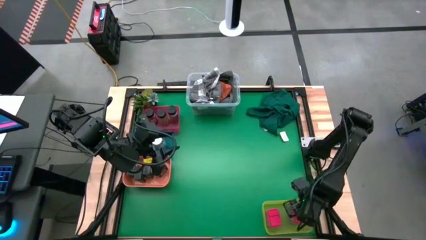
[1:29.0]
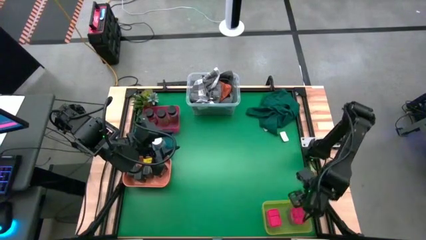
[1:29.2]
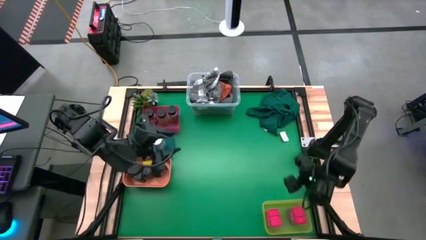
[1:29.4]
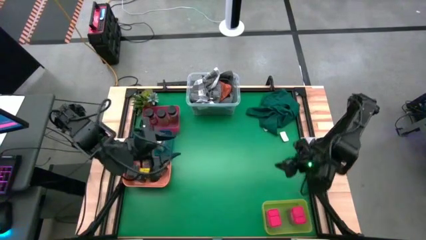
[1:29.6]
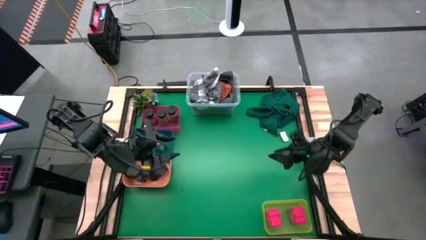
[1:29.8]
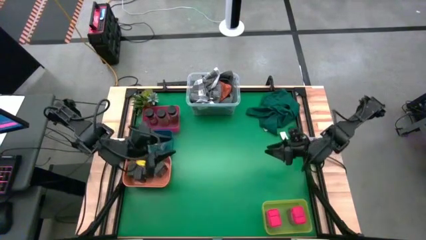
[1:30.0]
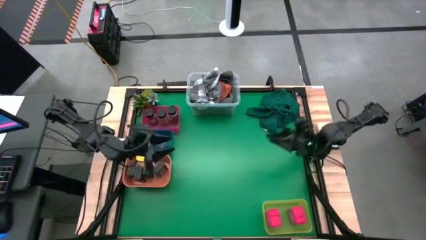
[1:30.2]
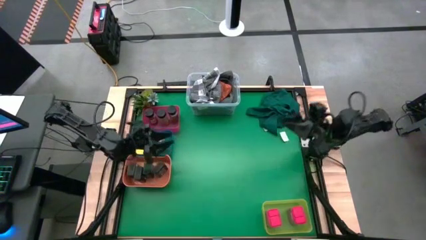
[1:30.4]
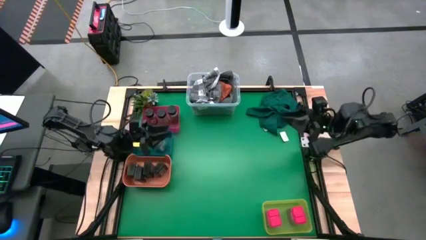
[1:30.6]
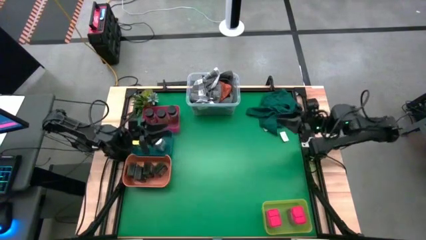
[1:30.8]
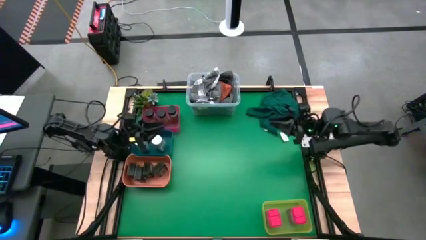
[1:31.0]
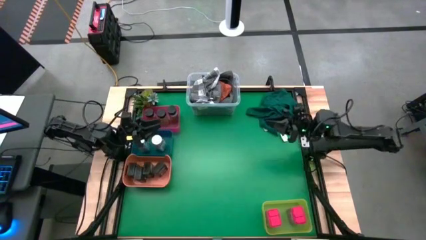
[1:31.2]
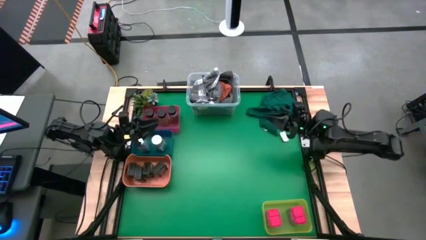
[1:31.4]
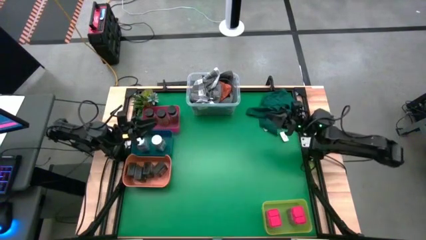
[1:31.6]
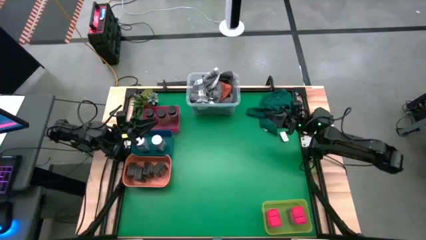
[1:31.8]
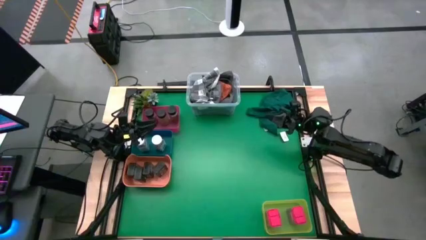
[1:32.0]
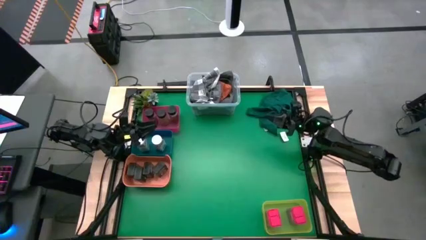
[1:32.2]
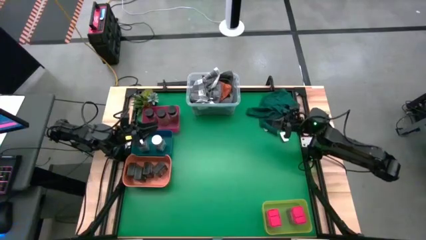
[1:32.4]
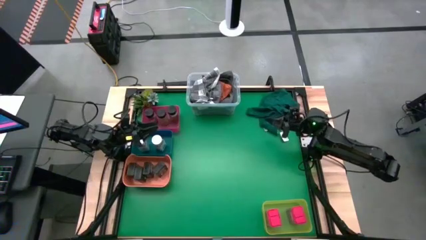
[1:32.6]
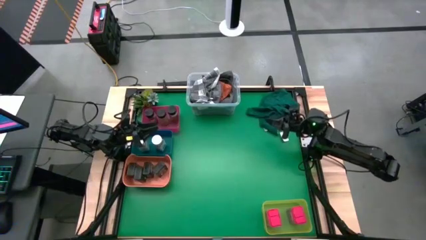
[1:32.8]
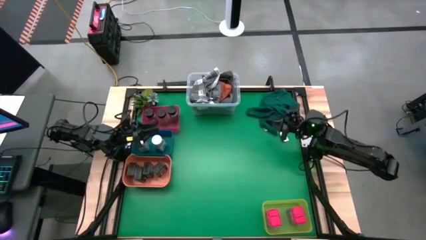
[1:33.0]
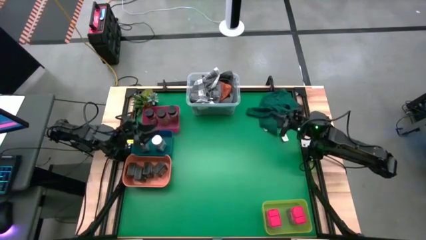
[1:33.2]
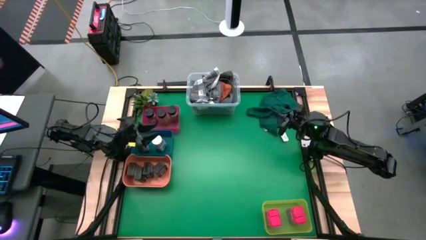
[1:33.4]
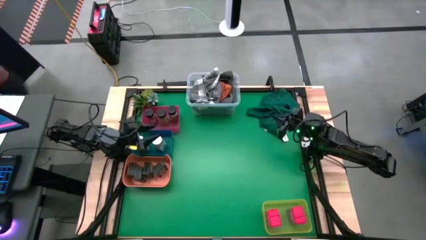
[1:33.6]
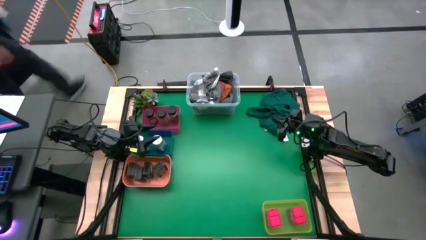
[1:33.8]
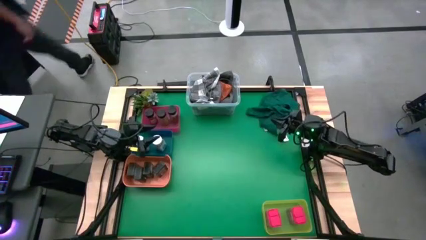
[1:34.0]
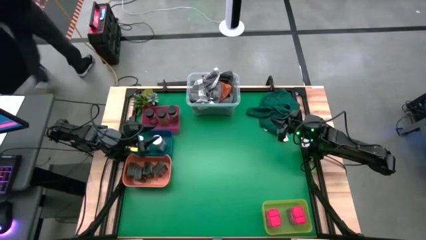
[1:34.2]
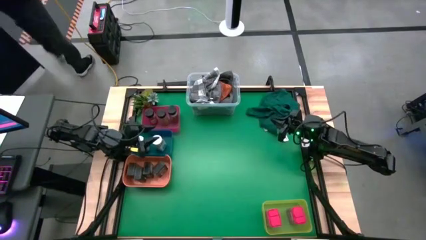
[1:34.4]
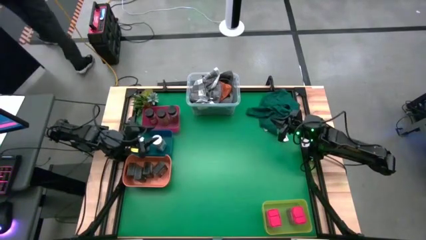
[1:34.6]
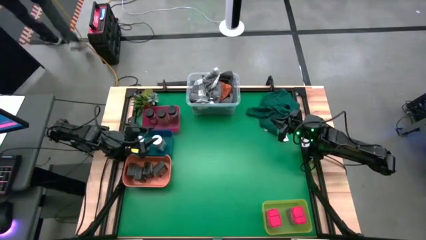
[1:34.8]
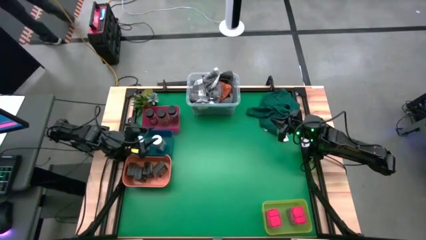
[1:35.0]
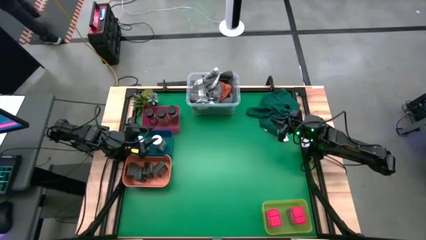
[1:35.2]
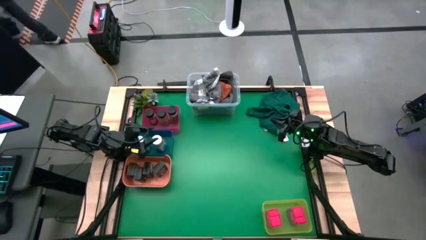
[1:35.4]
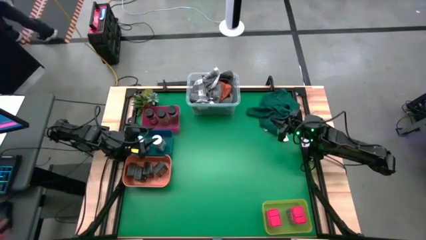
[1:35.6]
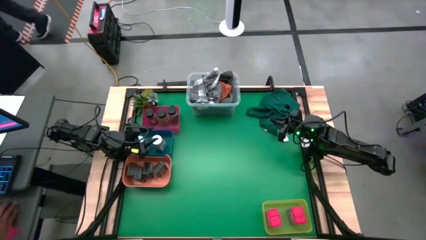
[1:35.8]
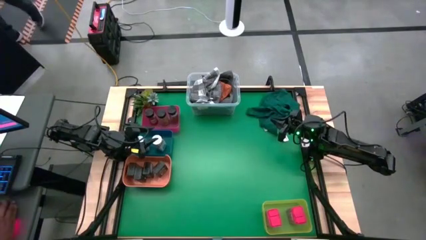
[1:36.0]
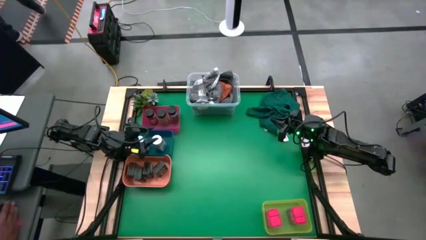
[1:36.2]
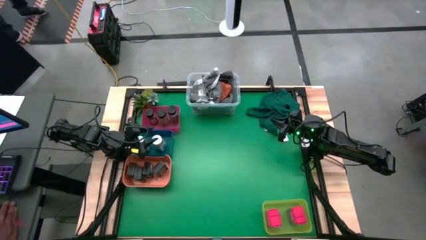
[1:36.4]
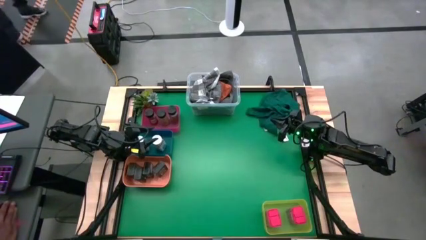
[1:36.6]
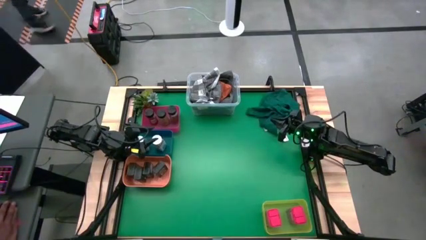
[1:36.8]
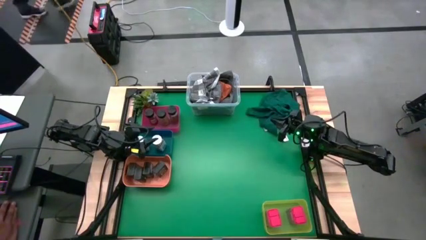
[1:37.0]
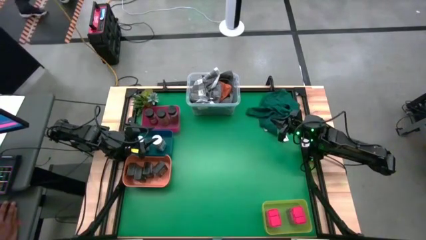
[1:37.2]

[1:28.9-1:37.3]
Task: Sort spices by type
Return to Home Position

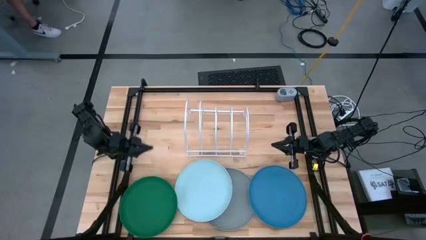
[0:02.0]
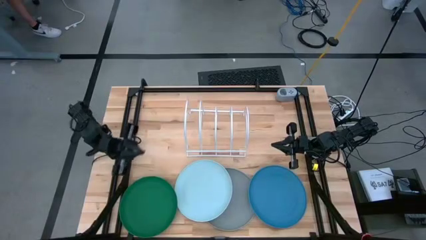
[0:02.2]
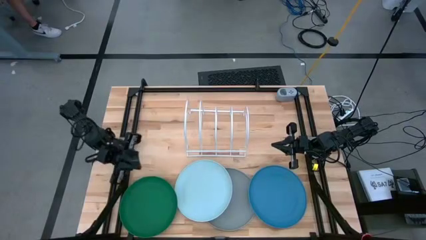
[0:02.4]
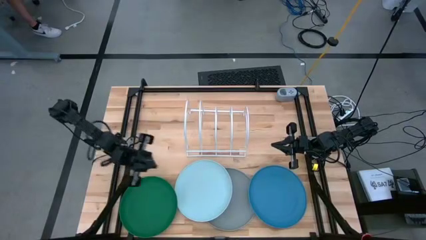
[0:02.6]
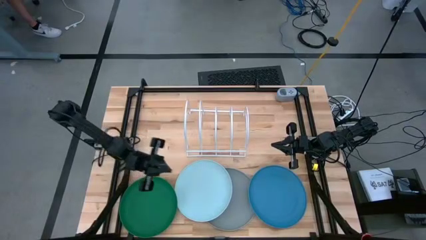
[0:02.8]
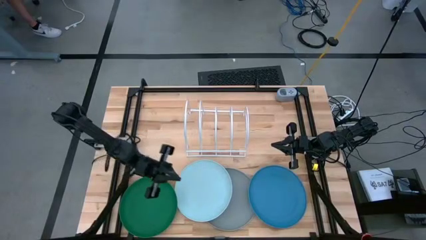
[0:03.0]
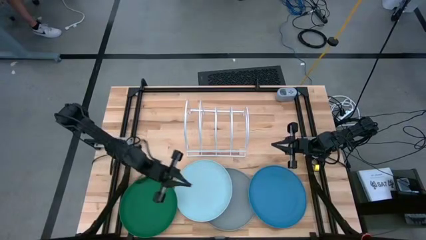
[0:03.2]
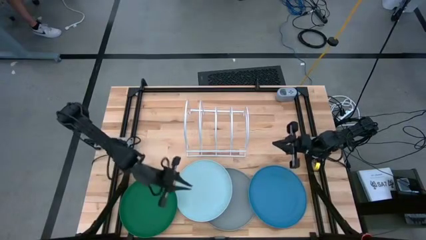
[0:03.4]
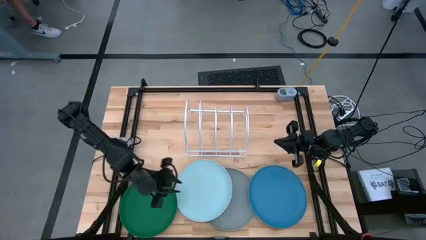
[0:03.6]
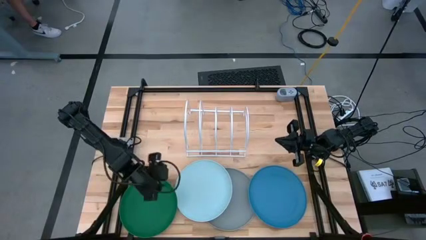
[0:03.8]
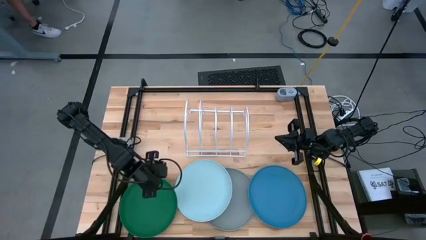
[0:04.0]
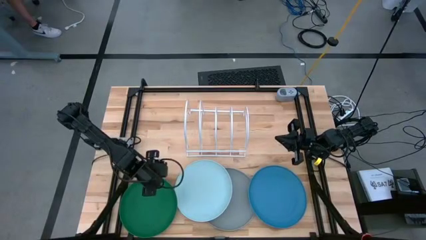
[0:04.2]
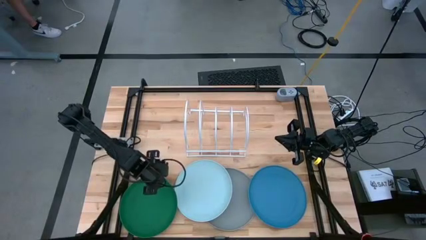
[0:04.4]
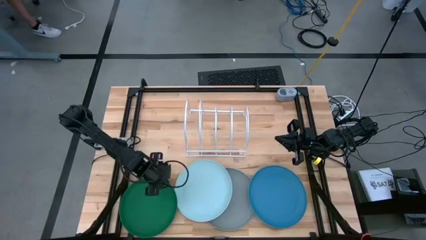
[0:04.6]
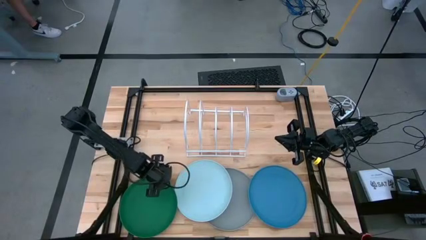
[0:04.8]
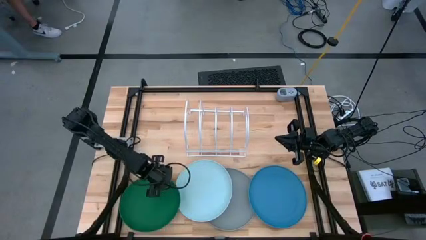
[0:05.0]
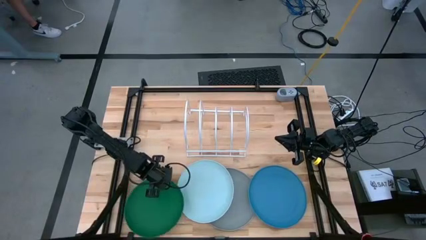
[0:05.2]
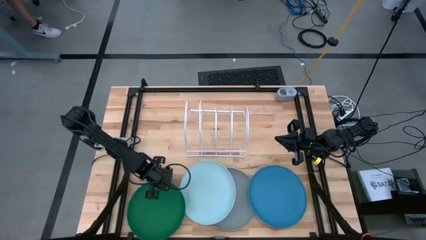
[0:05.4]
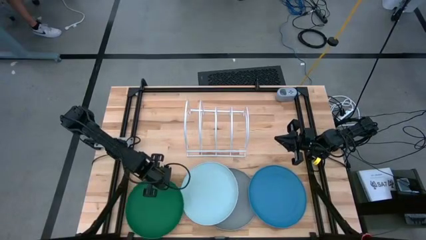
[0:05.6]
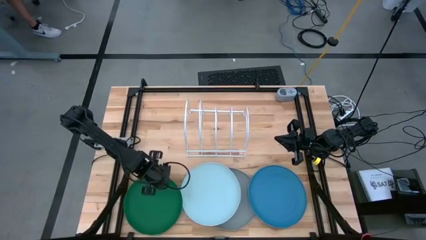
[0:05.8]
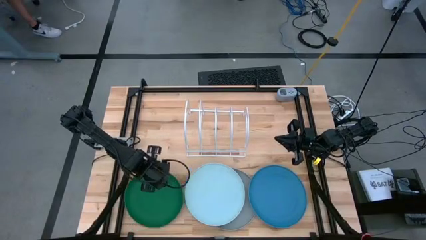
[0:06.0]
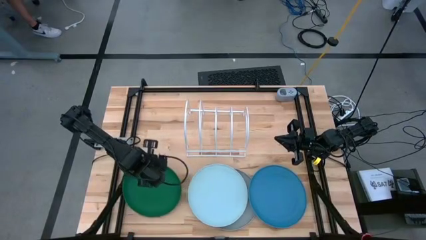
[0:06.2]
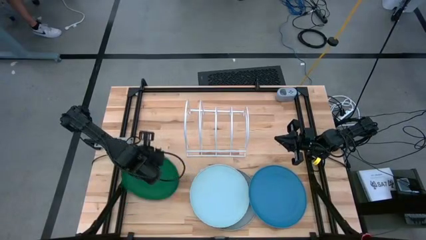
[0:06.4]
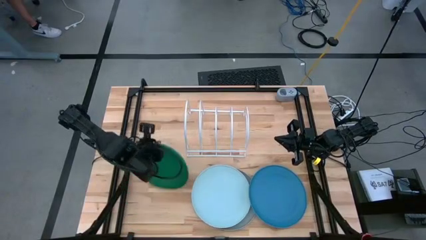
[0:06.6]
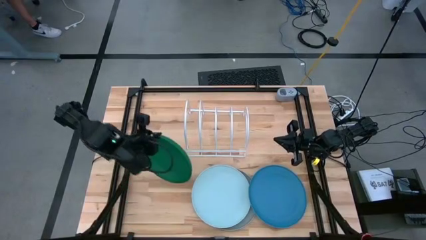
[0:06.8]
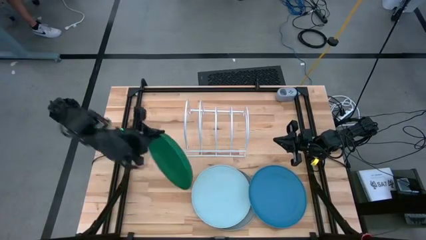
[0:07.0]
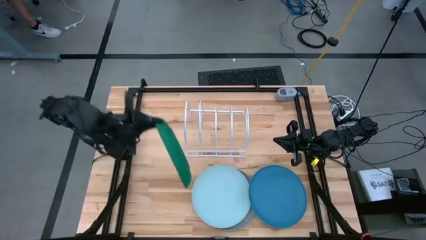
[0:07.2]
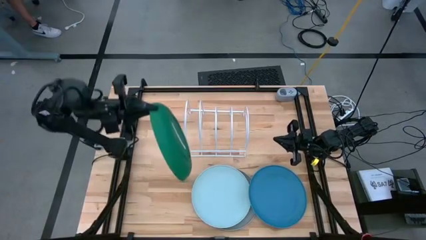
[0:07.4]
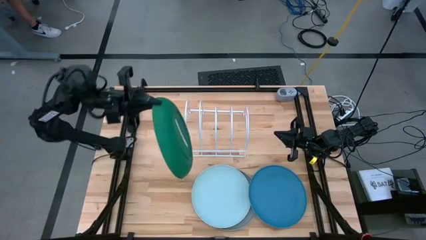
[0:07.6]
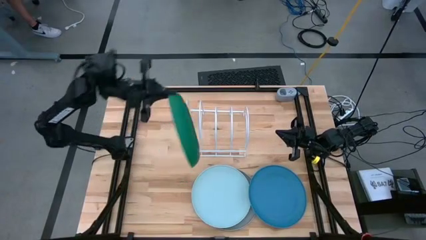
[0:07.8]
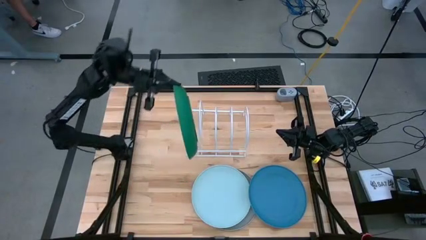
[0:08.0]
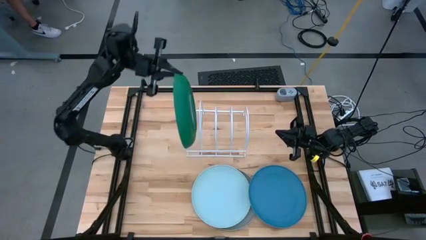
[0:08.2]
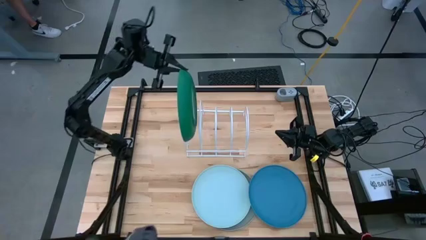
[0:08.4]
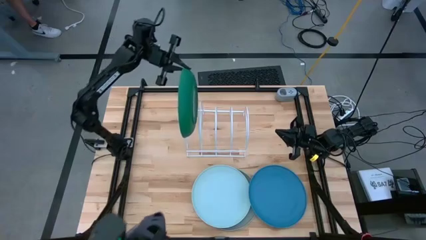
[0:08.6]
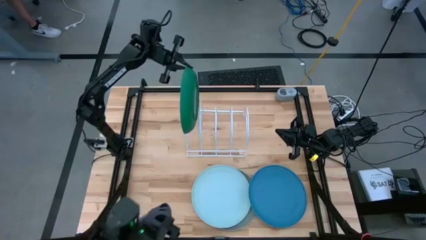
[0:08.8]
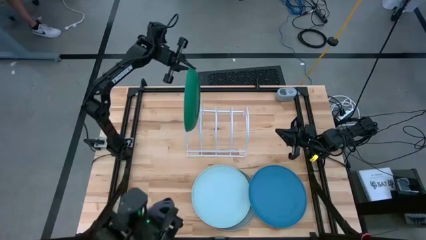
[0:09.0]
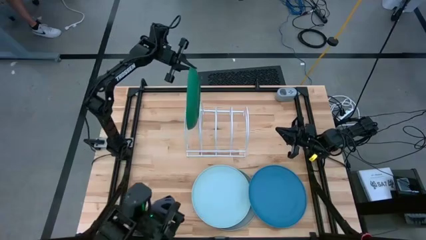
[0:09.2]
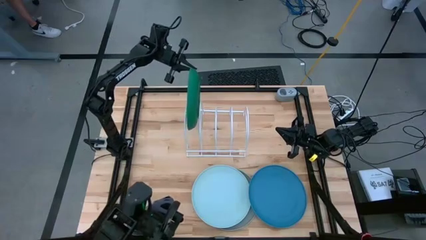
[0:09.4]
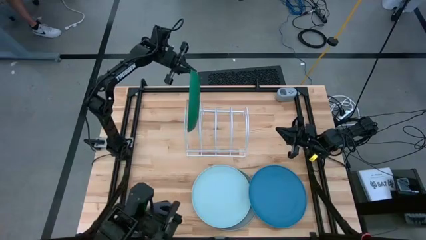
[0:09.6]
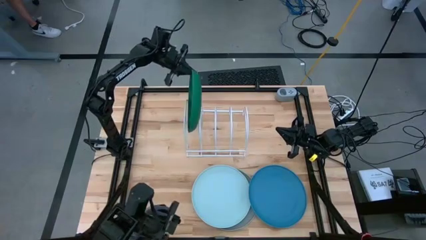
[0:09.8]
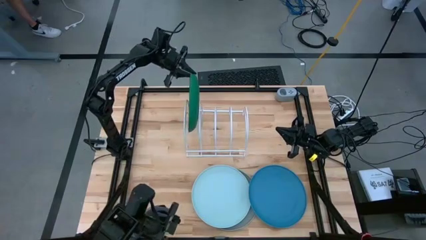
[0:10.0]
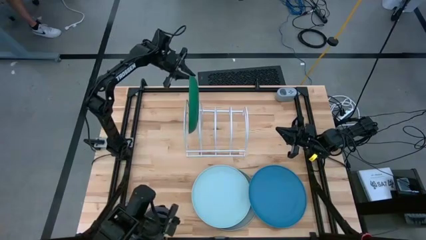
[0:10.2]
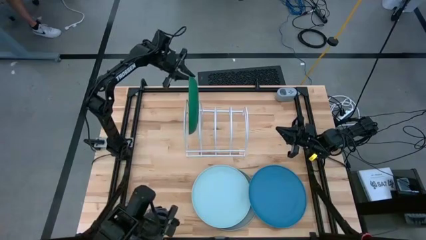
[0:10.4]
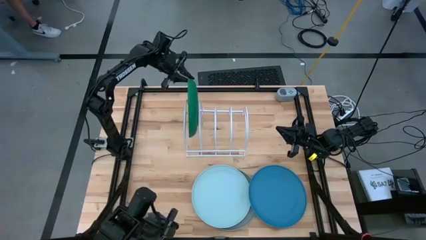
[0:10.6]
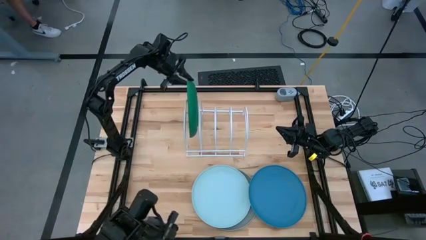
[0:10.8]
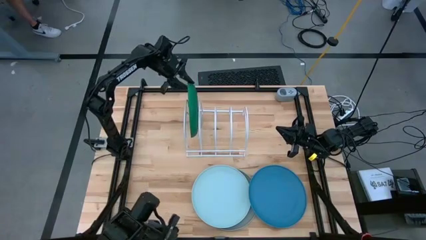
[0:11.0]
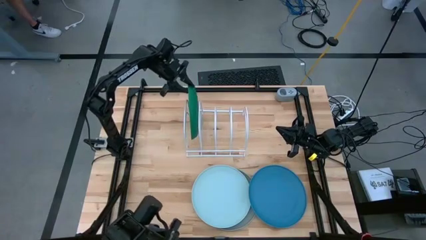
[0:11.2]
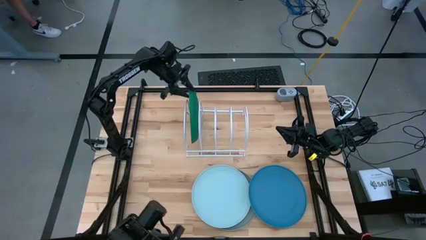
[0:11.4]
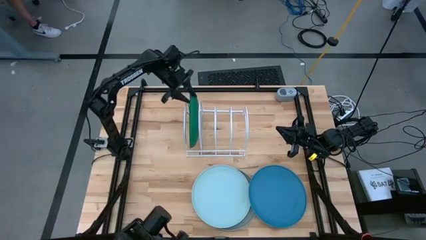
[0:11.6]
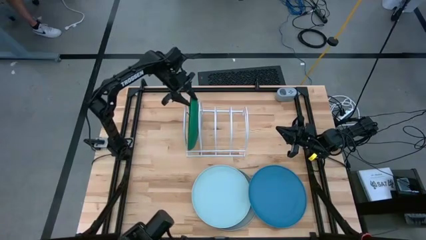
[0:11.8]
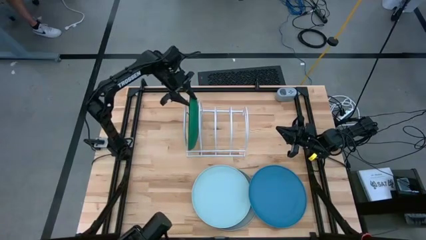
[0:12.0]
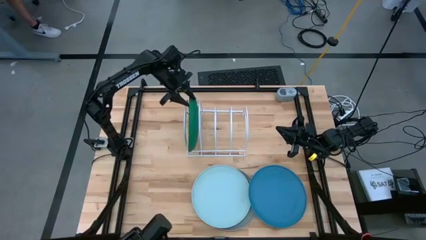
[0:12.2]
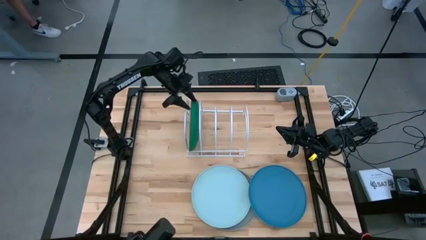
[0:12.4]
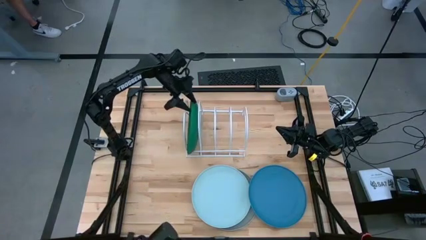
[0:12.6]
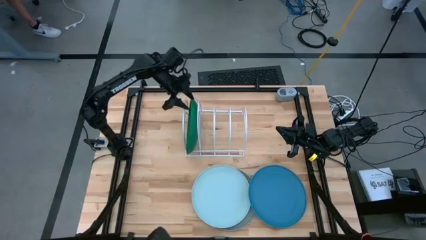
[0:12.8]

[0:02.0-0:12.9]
Task: Sort dishes
Put the green plate in the dish rack
